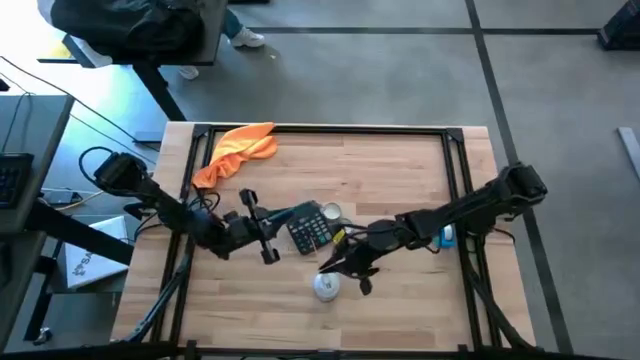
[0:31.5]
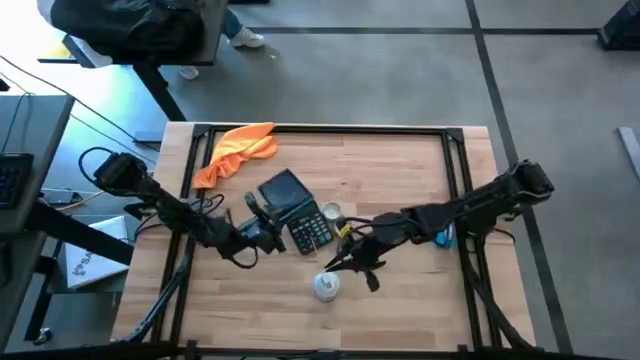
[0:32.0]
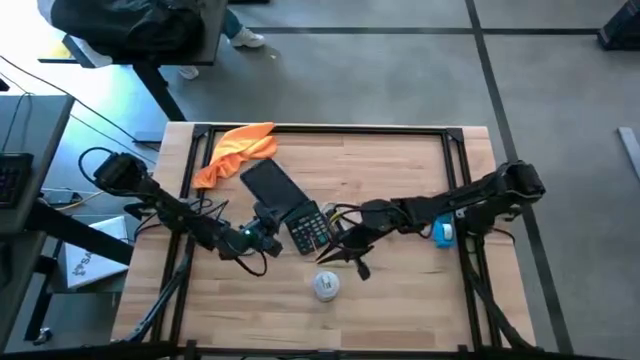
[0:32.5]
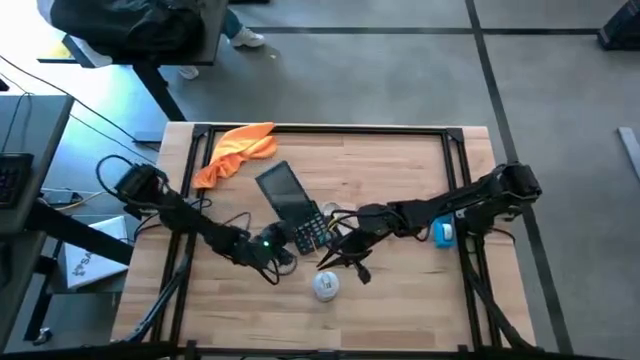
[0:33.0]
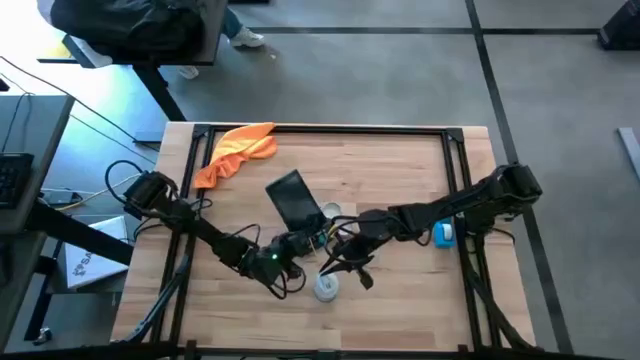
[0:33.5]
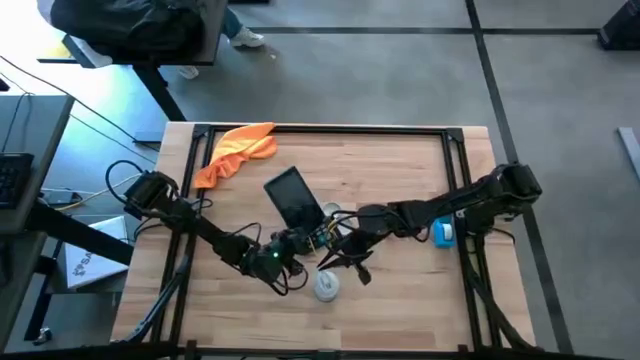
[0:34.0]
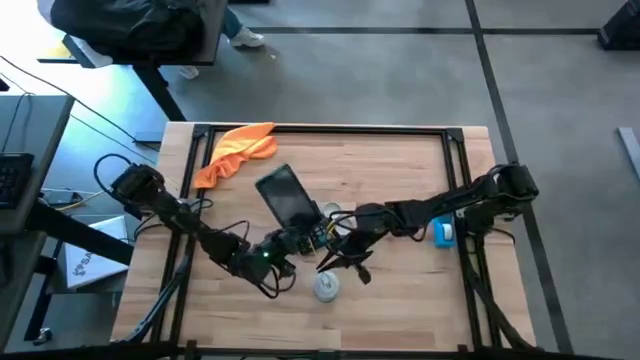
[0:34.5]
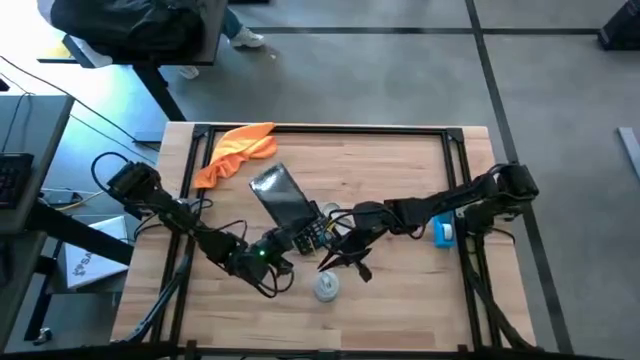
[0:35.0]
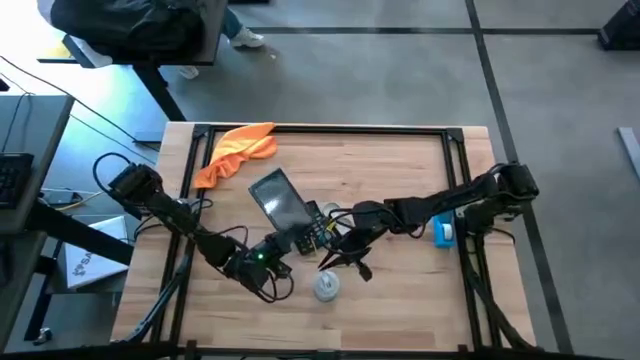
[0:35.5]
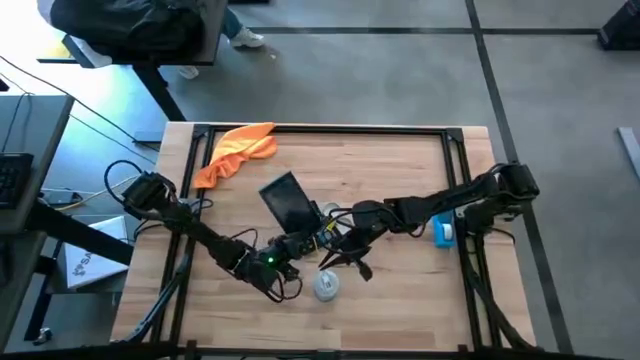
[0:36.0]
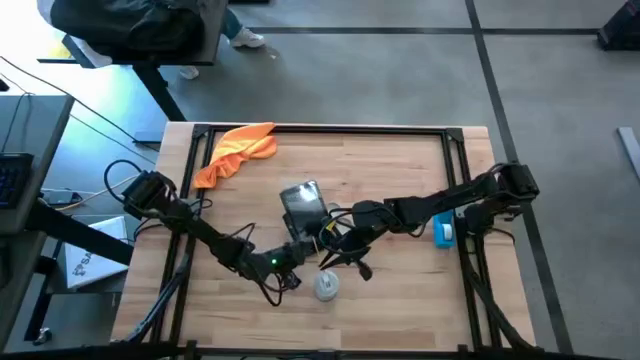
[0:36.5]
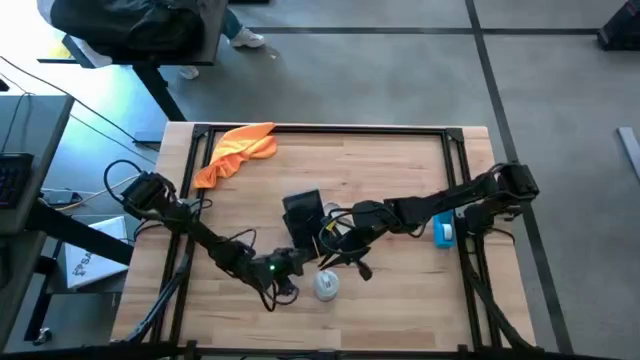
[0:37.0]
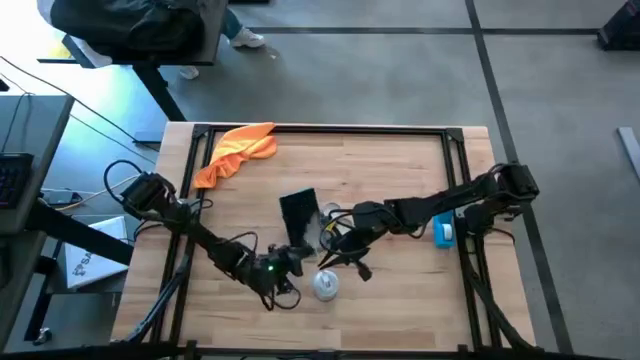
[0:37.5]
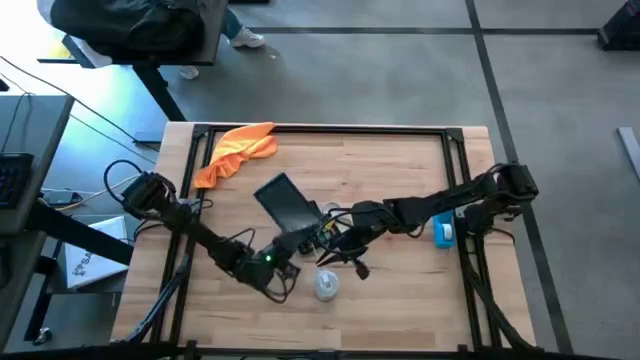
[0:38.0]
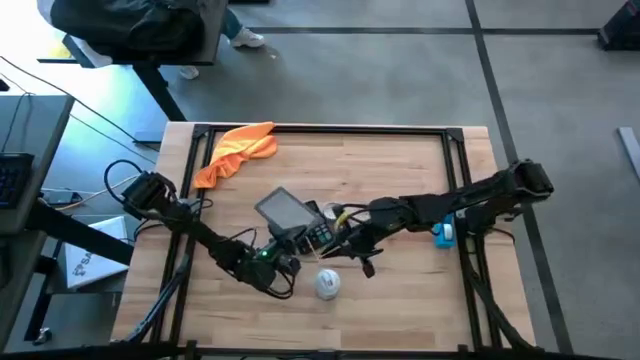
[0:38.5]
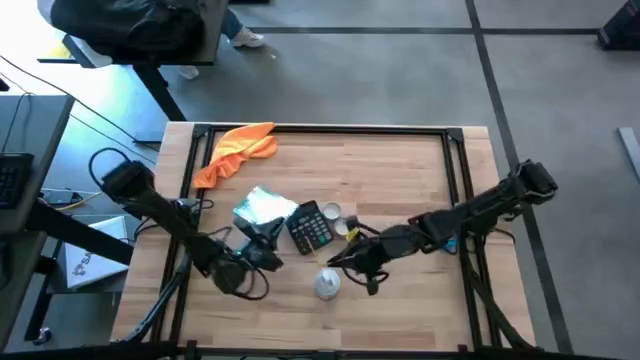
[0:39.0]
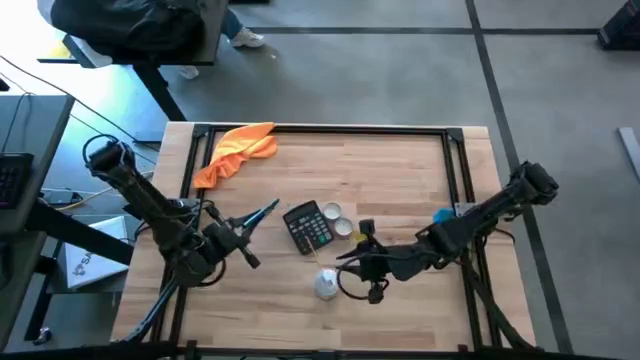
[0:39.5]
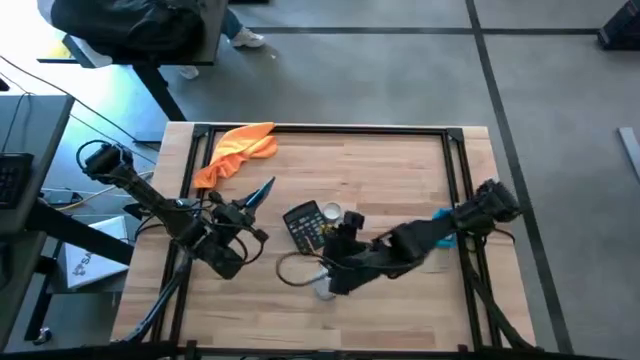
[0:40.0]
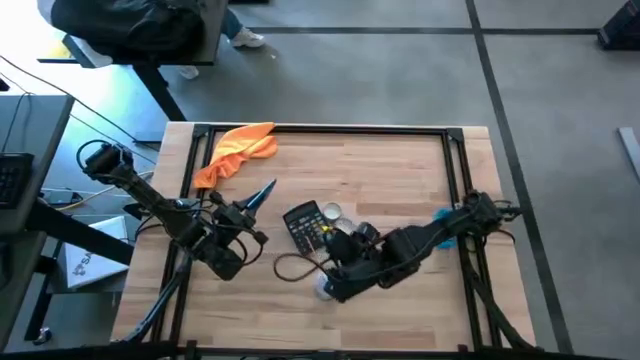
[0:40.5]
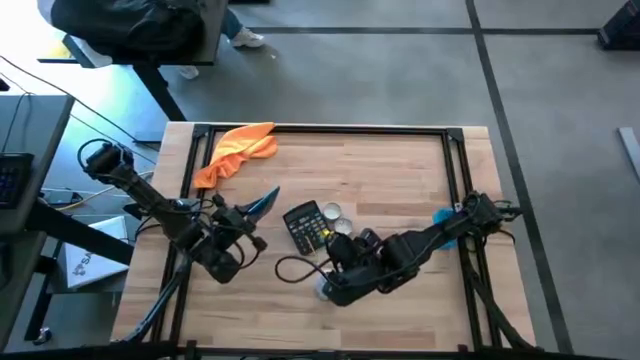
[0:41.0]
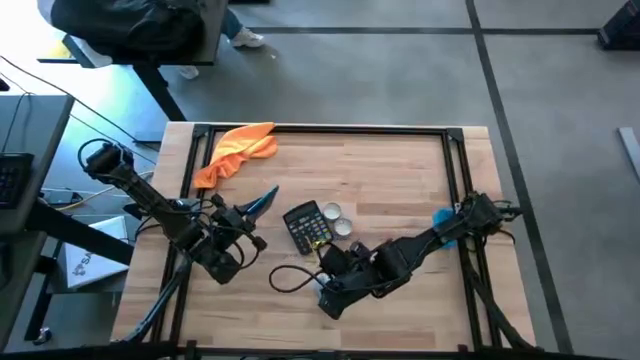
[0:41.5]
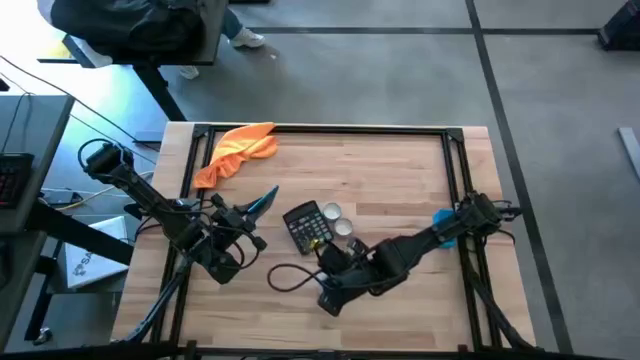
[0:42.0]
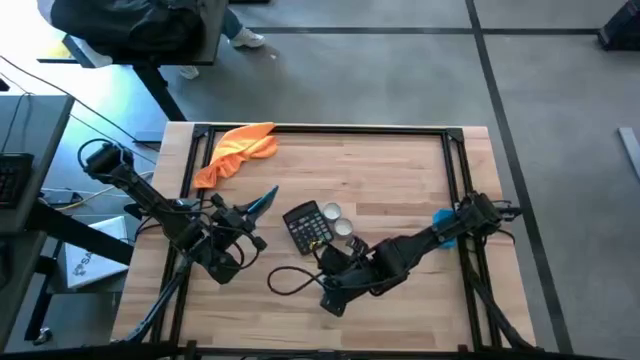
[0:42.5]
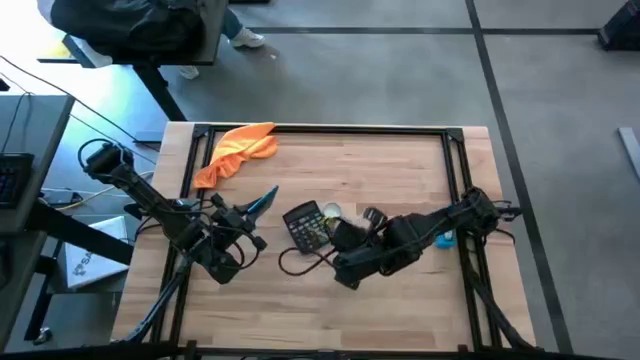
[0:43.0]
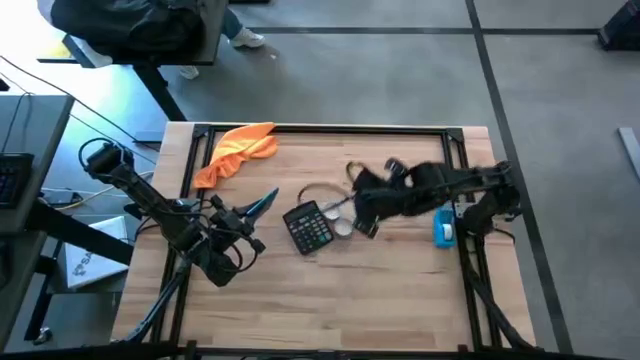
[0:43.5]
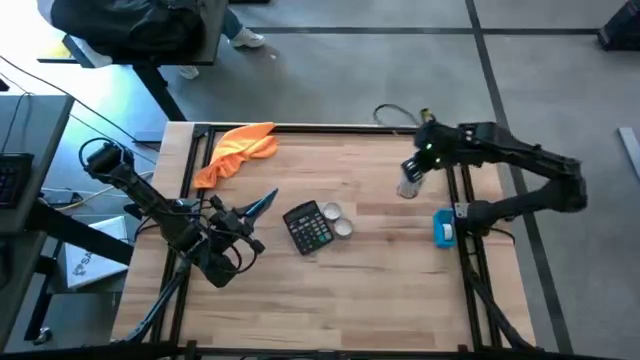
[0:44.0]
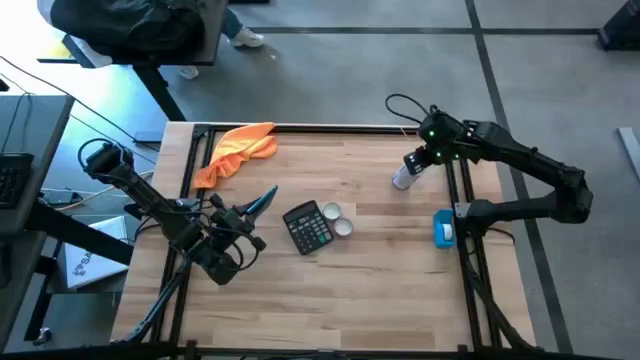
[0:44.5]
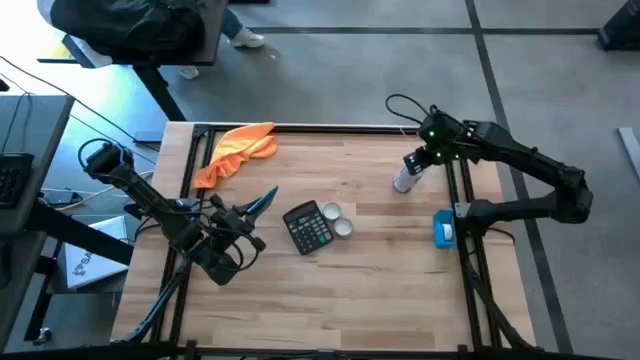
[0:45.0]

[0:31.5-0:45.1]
Task: Apply microfiber cloth
Spray the front of the black tablet using the white spray bottle

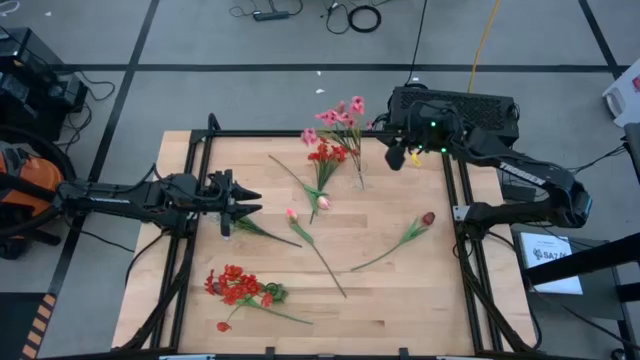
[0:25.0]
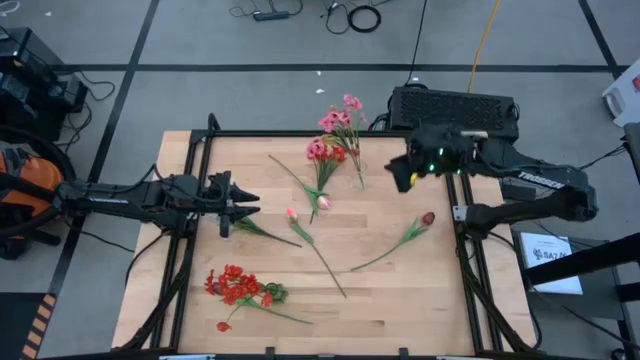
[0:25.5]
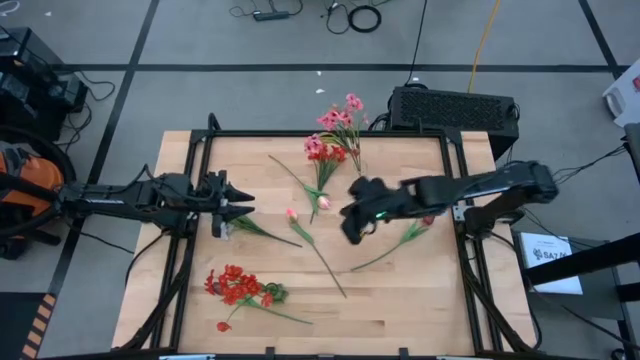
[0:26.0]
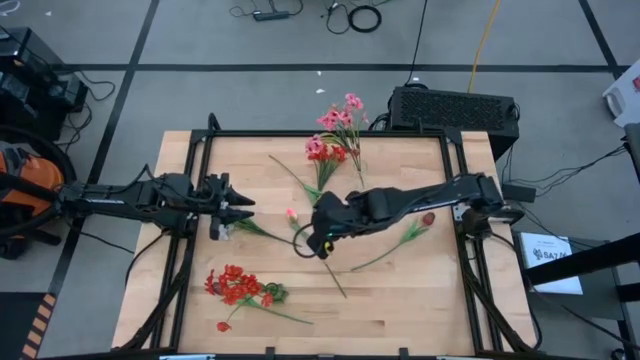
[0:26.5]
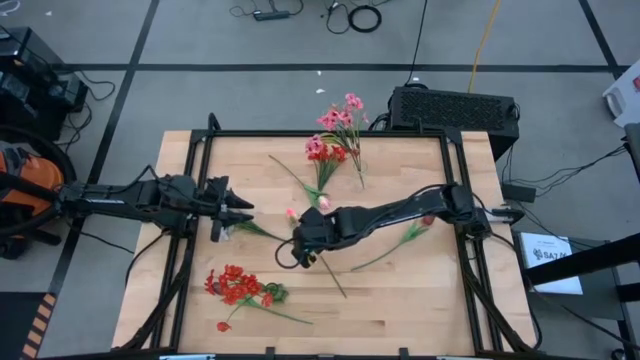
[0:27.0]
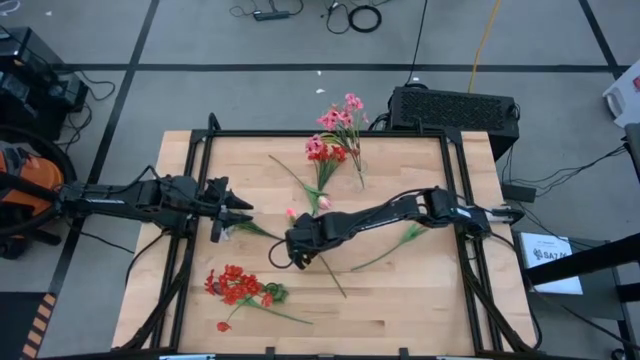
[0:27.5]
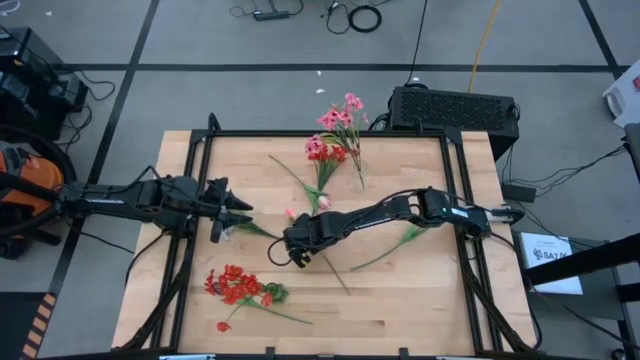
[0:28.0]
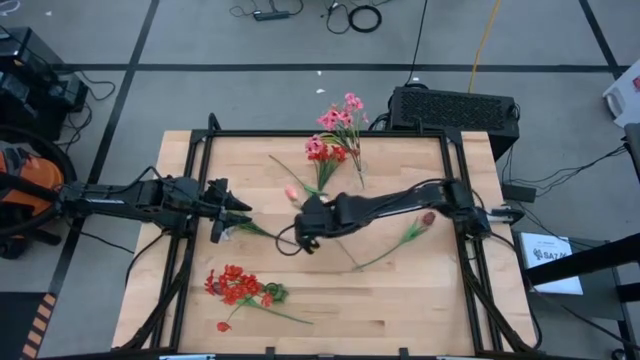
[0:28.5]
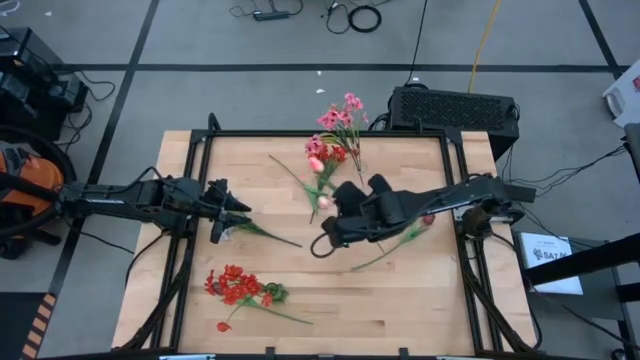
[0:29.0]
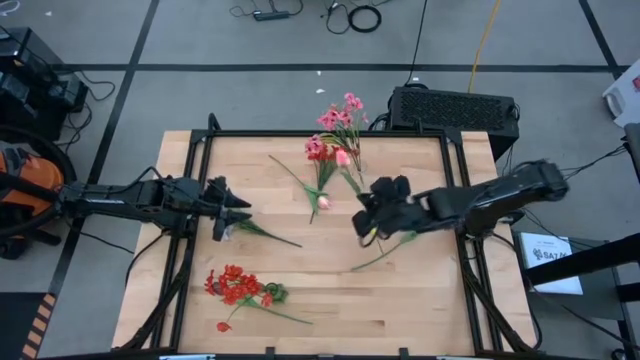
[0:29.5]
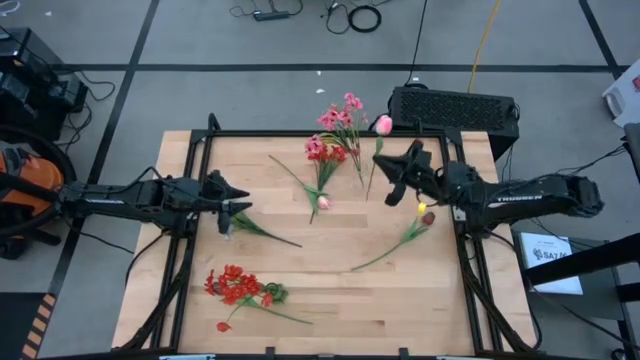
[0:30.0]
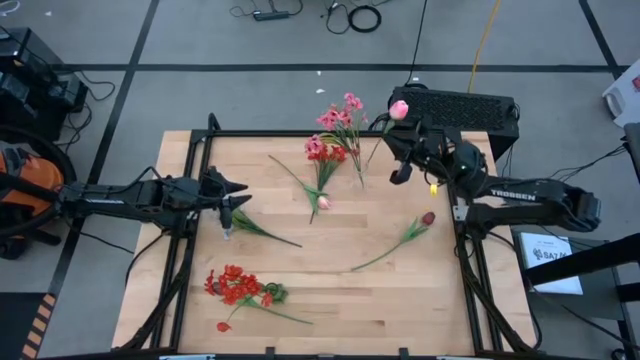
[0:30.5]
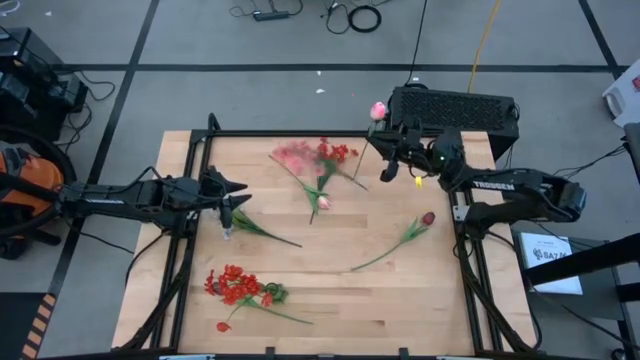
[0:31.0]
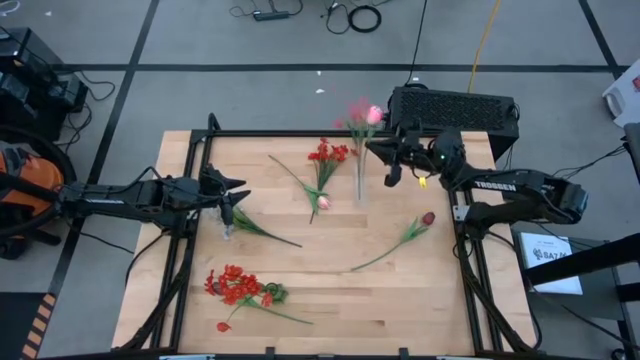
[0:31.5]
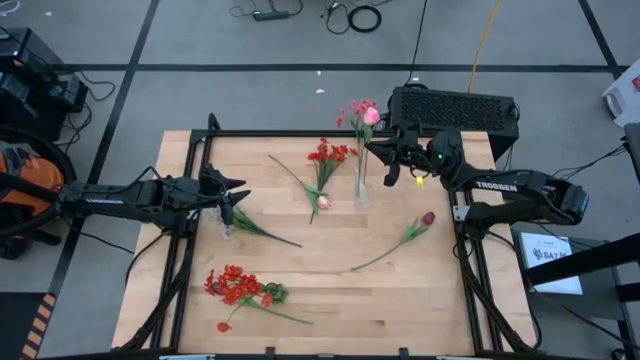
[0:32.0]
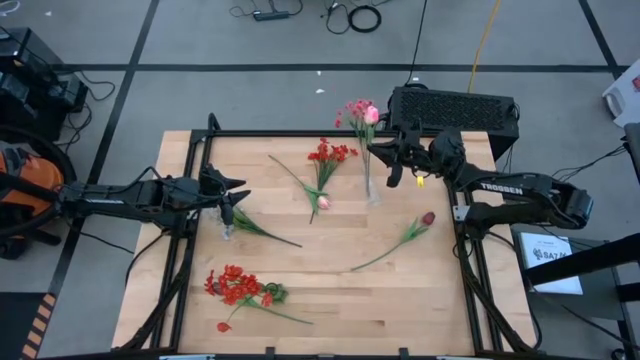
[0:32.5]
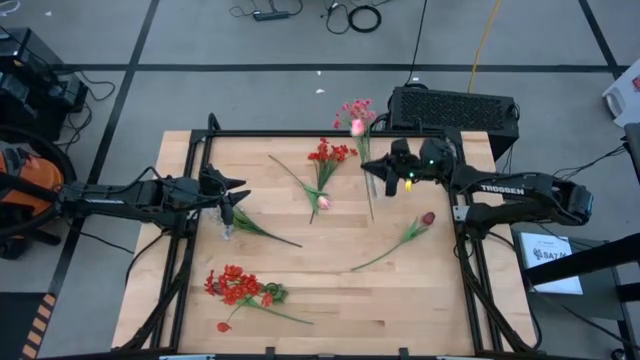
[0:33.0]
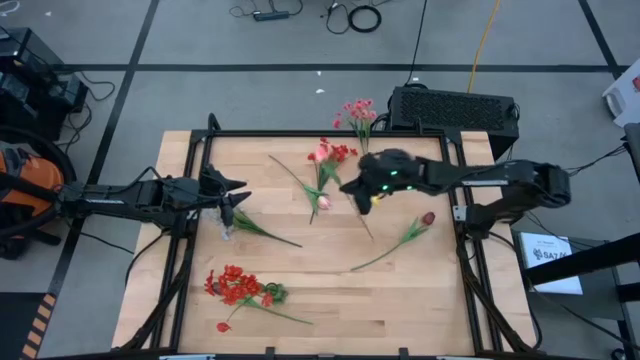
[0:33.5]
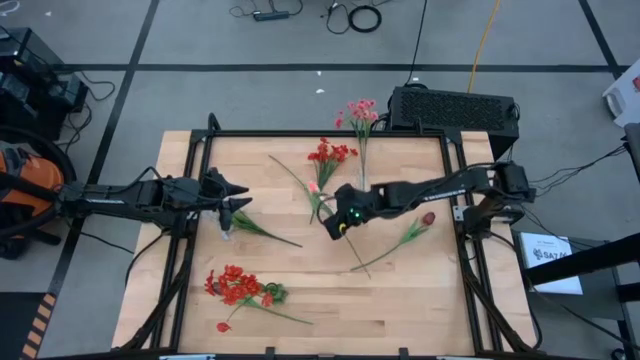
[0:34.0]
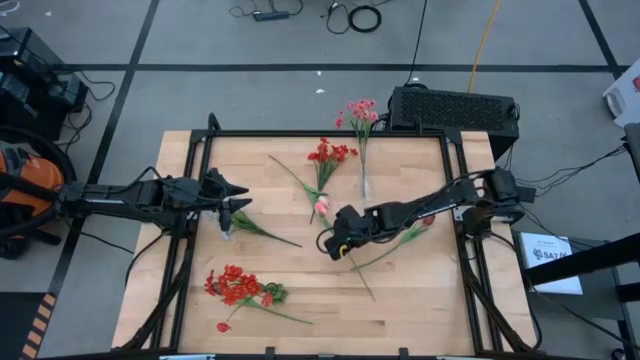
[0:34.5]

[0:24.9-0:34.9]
Task: Sort flowers into vase by color
Put the bottom pink flower into the transparent vase
